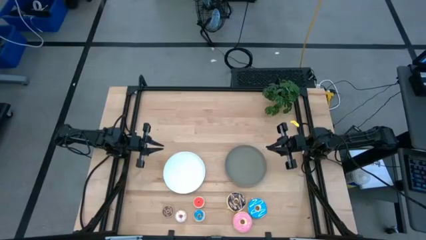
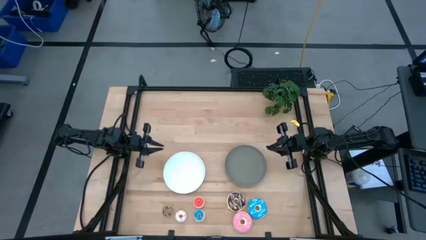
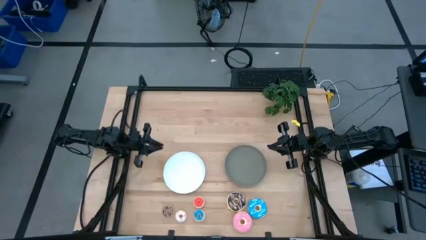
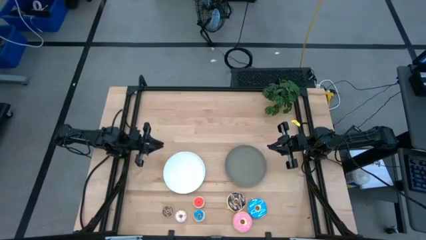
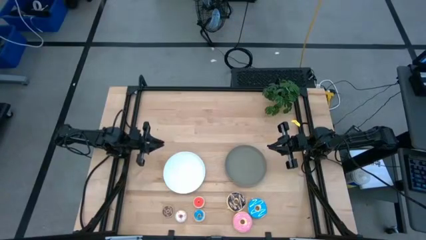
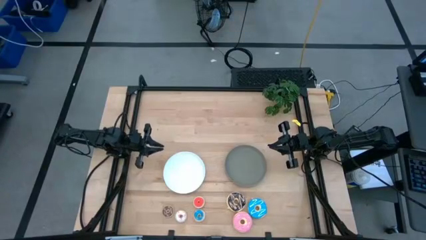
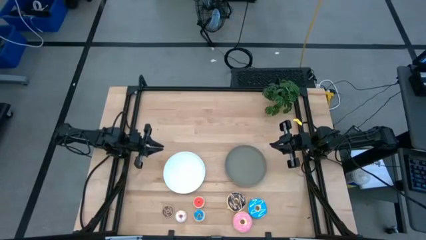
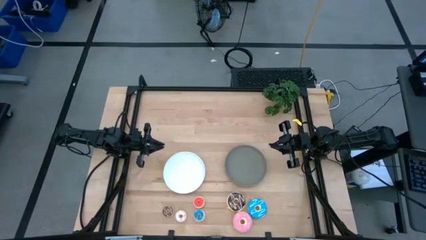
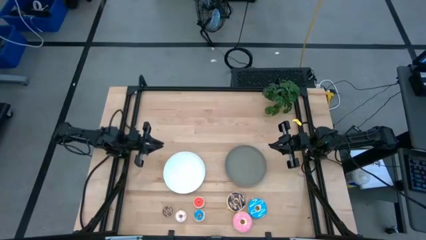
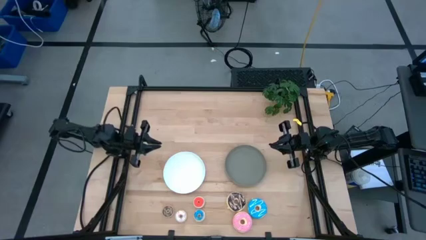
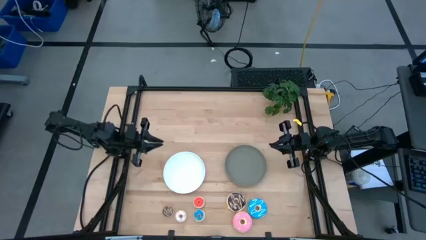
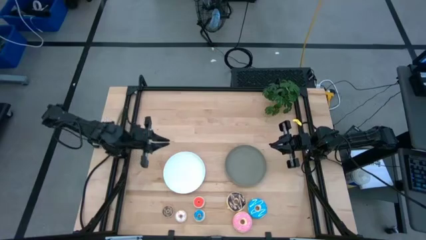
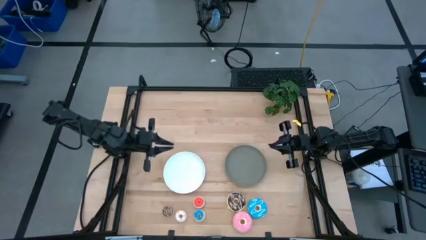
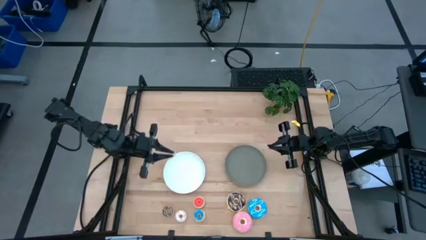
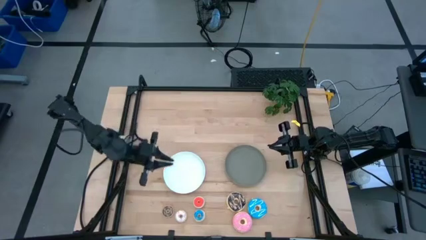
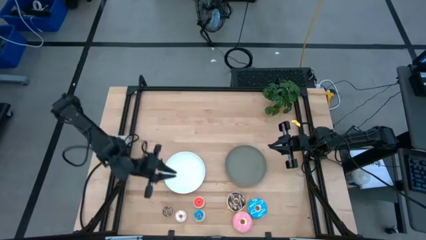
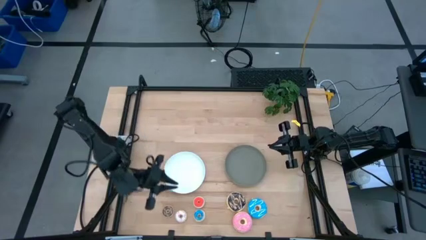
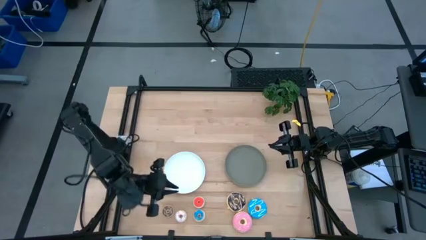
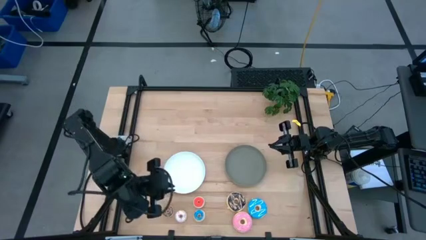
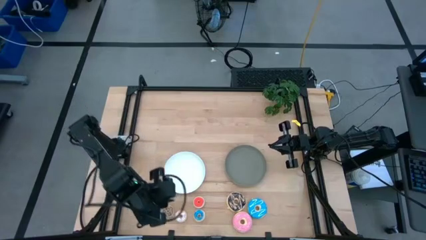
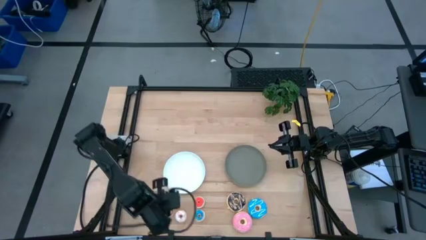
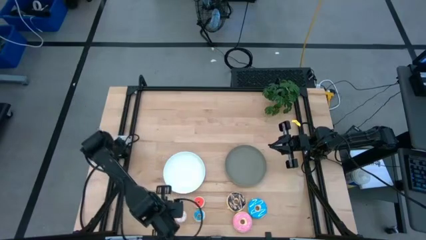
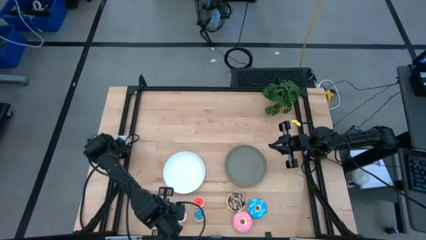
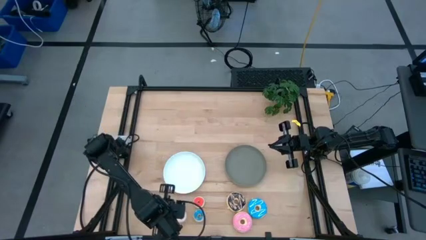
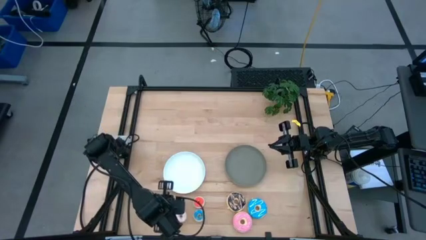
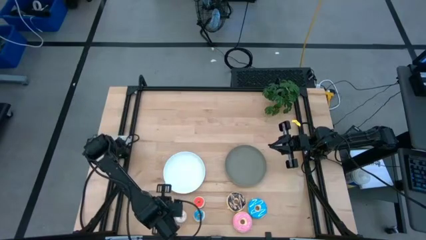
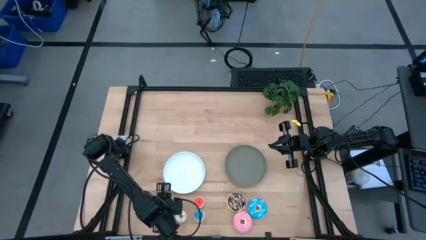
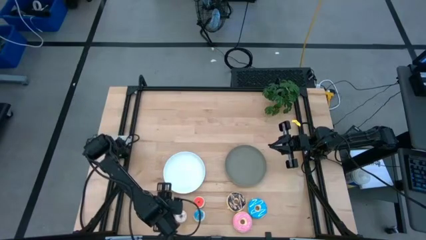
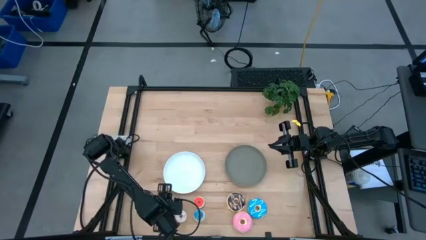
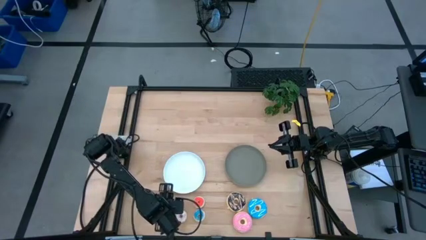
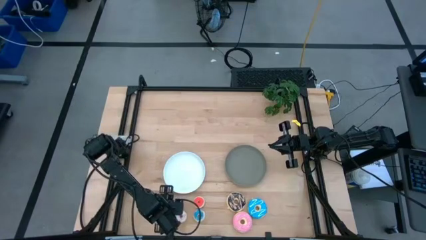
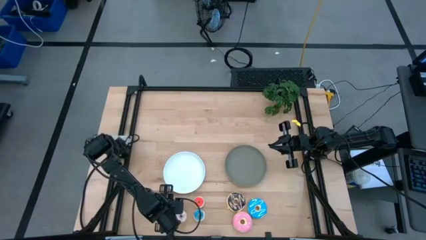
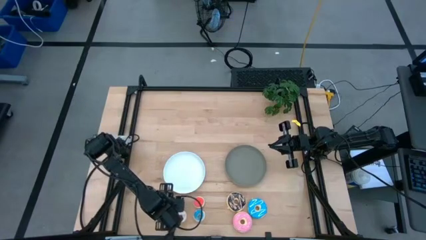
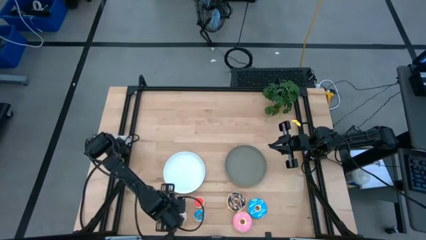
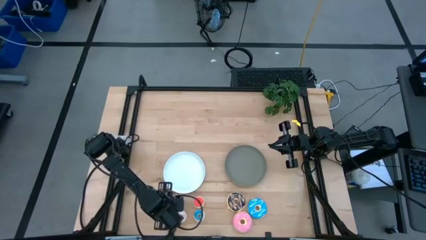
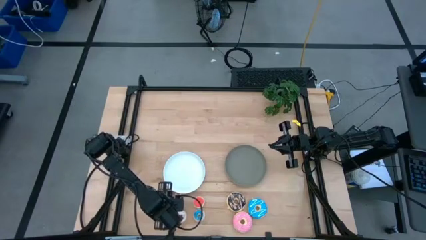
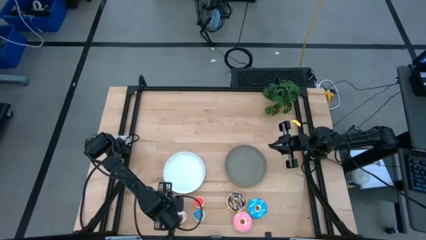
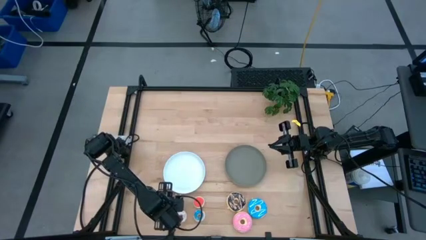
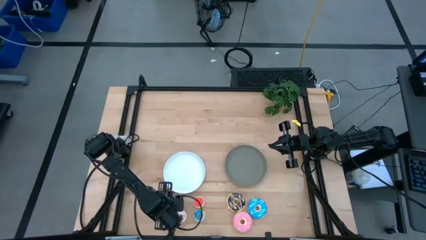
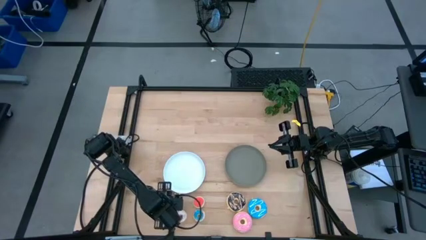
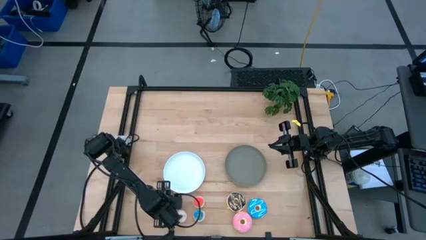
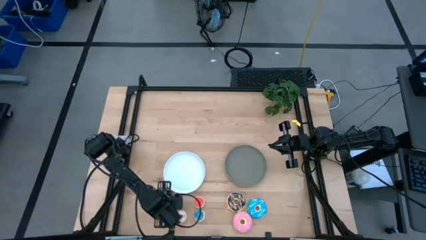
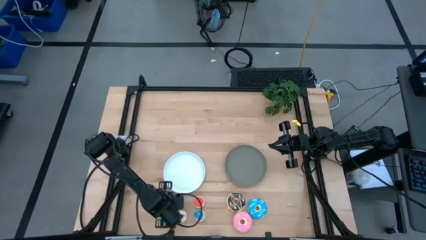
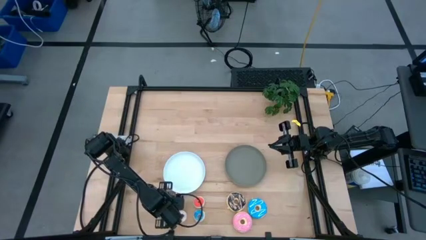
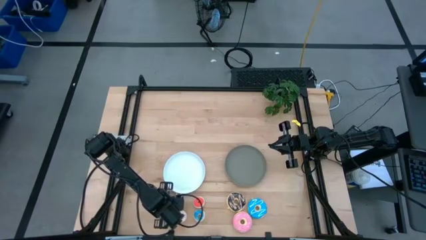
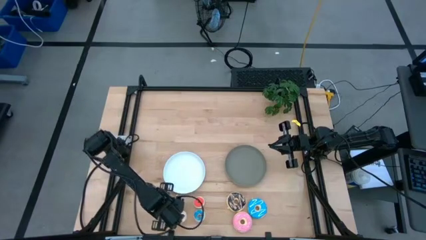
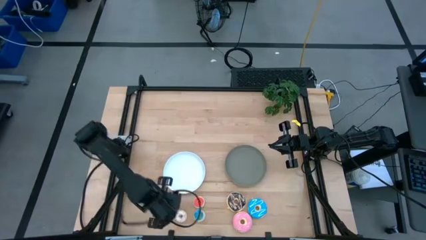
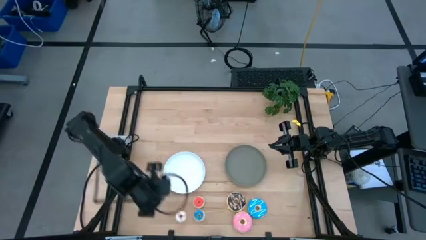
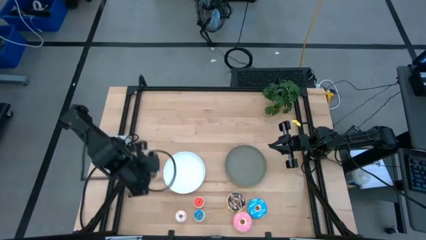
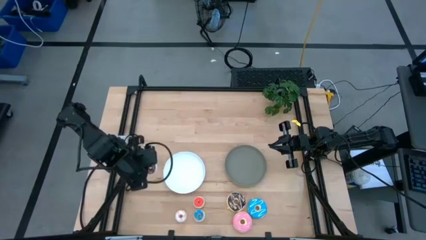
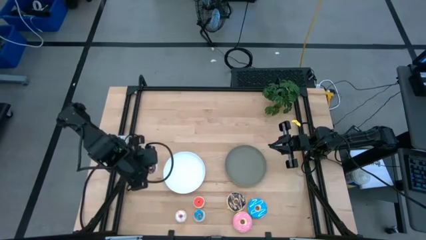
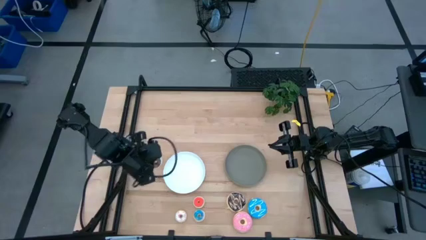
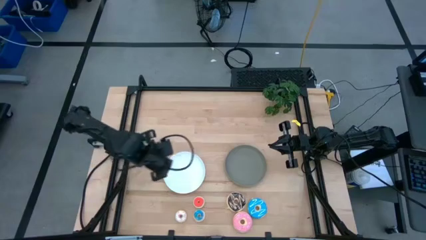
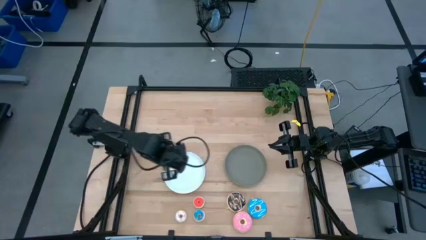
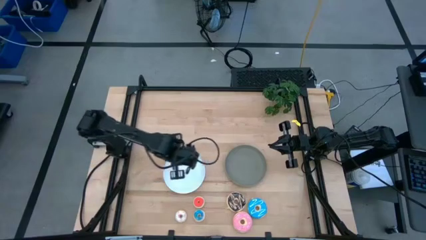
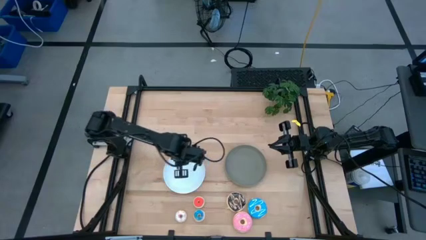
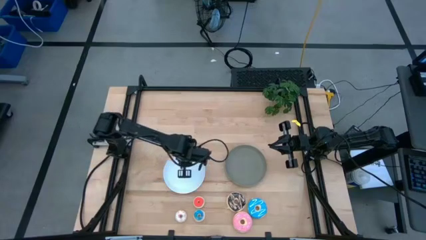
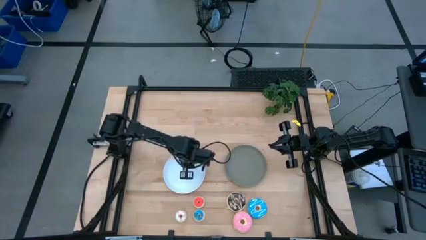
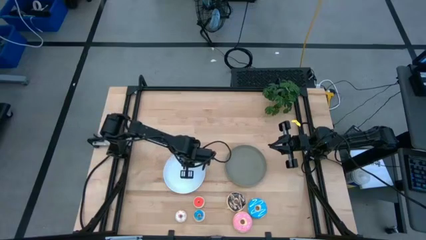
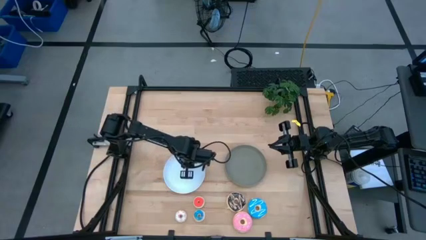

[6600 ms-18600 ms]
Task: Pick & Place donuts
Put the mini brown donut on the white plate

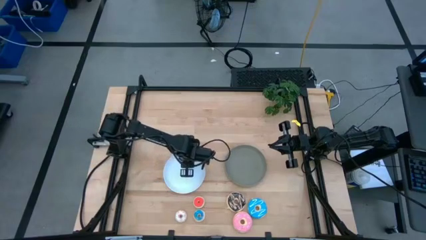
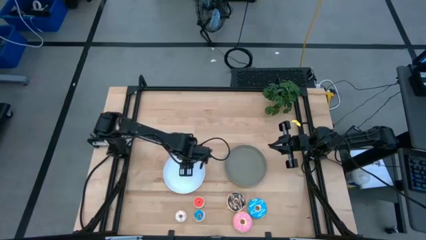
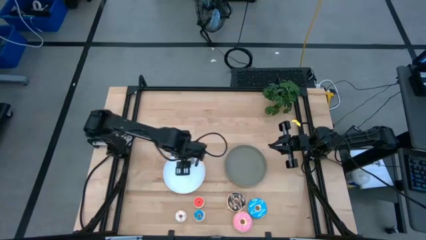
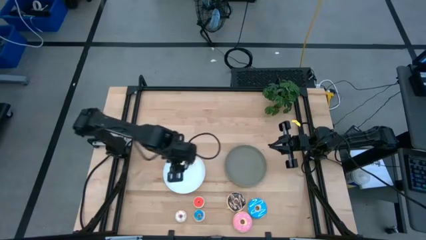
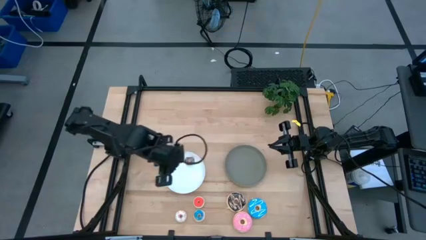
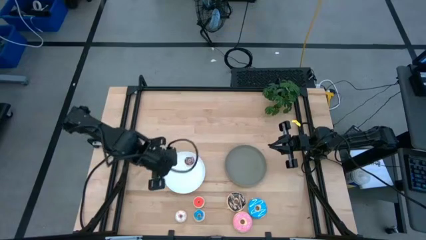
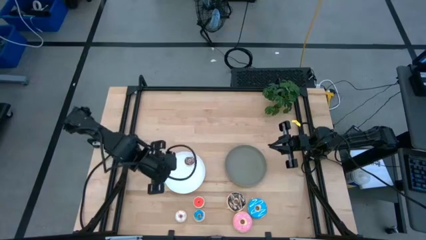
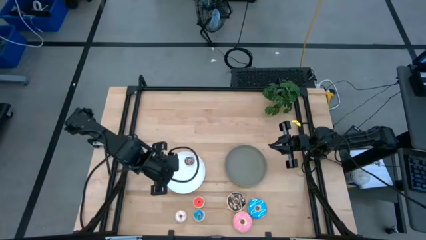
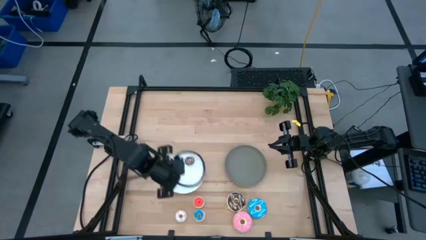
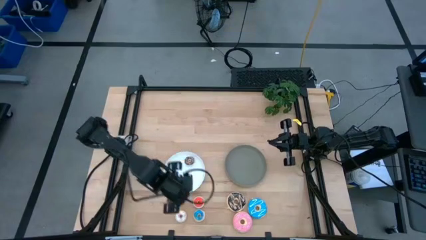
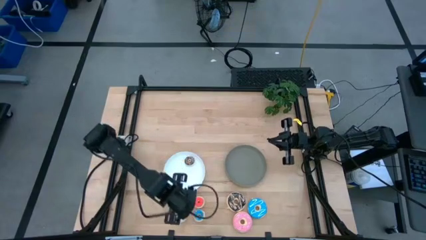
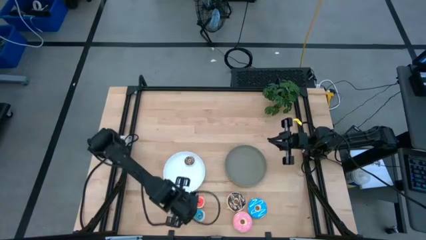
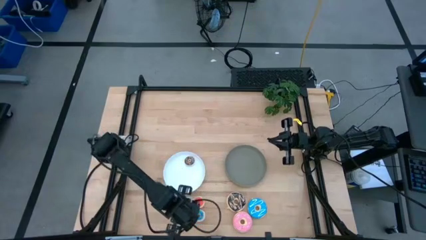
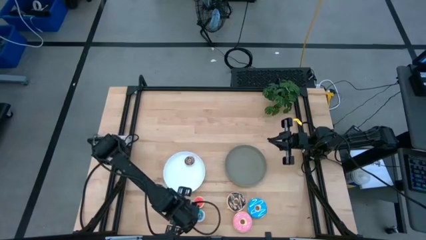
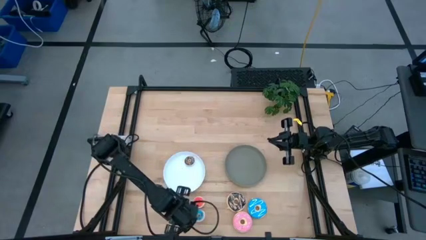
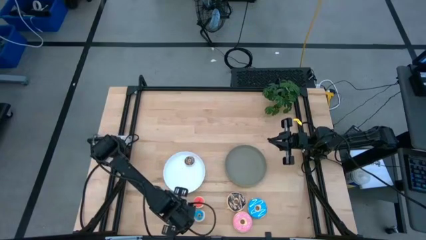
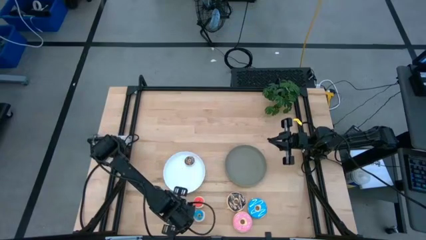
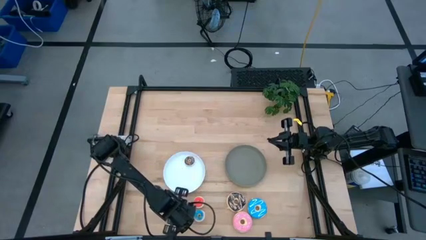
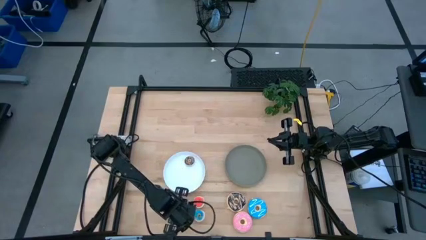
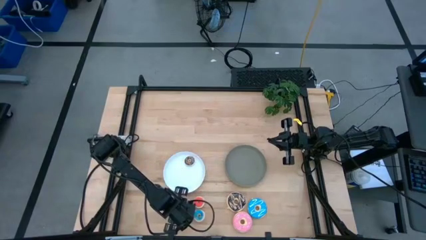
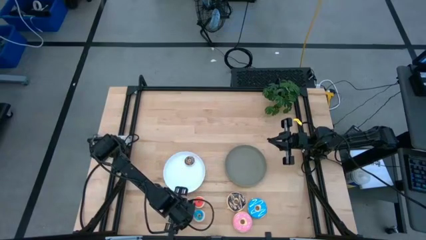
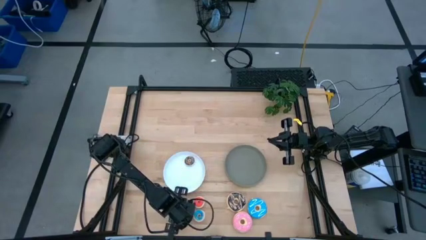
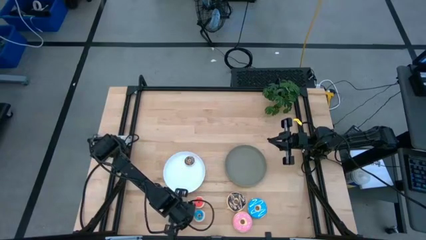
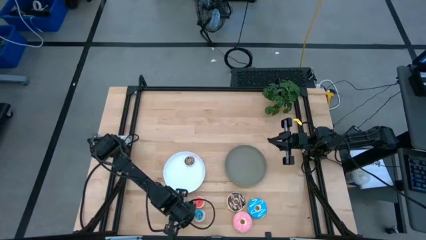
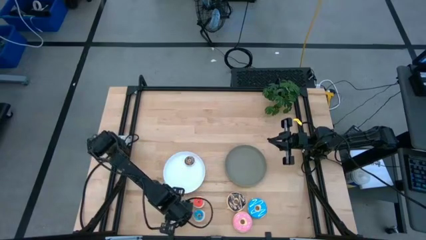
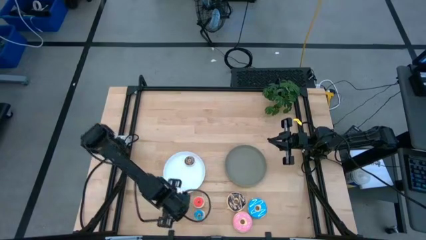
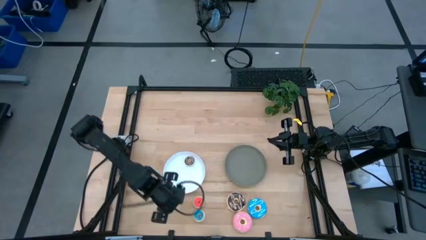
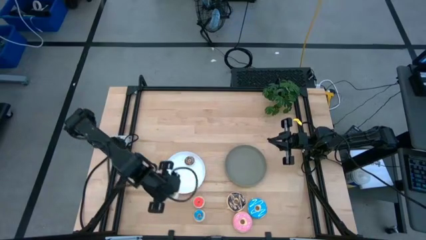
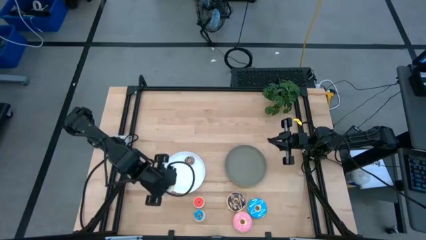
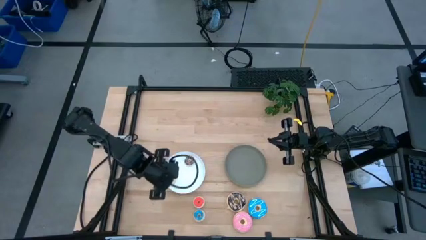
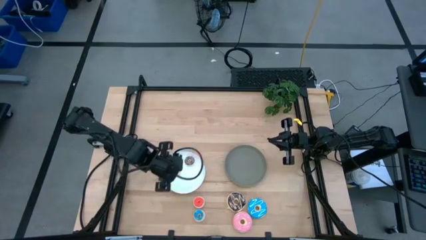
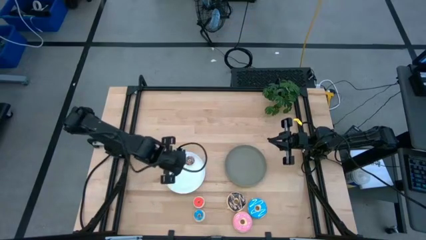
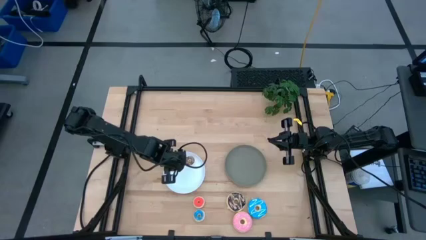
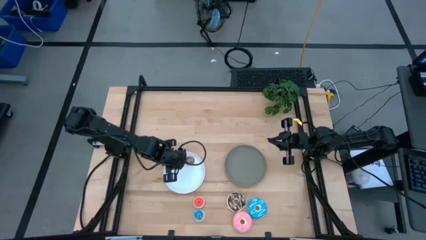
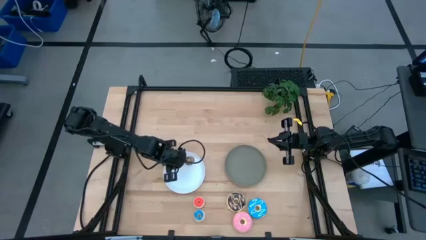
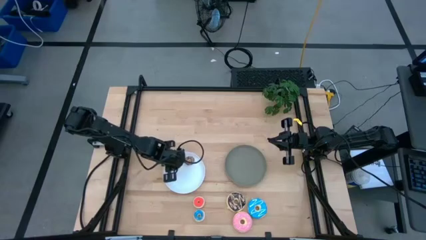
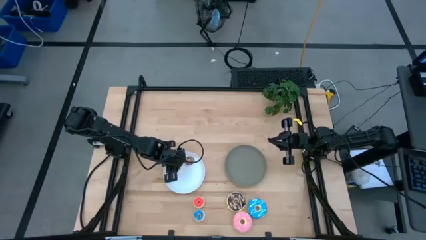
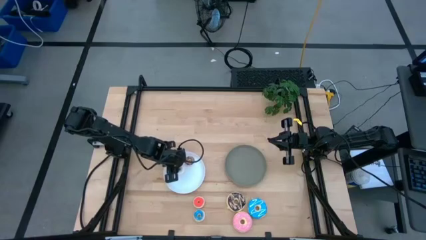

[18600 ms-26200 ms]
Put the mini white donut on the white plate
